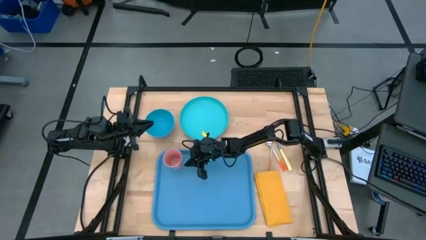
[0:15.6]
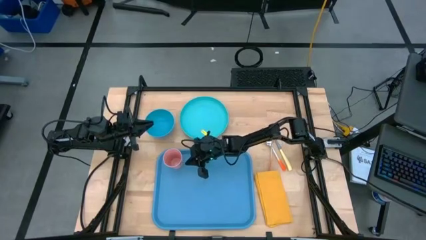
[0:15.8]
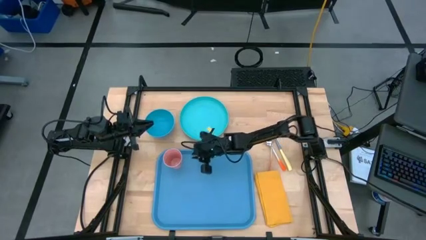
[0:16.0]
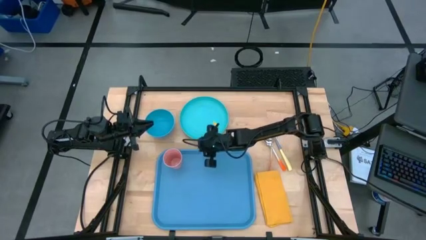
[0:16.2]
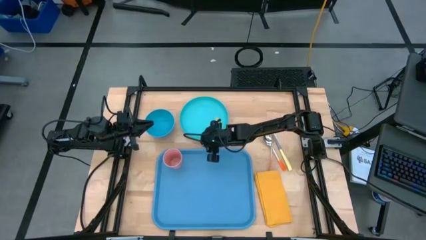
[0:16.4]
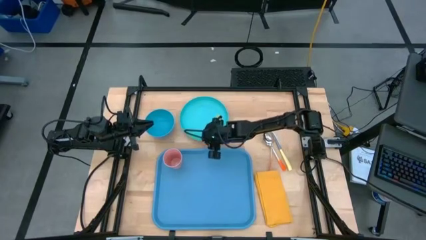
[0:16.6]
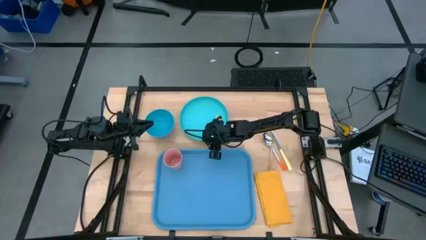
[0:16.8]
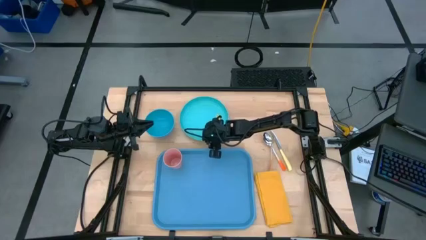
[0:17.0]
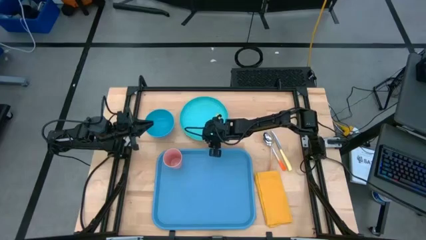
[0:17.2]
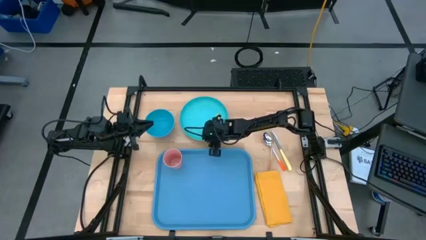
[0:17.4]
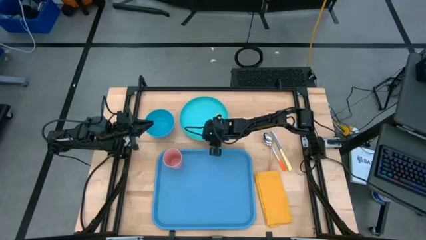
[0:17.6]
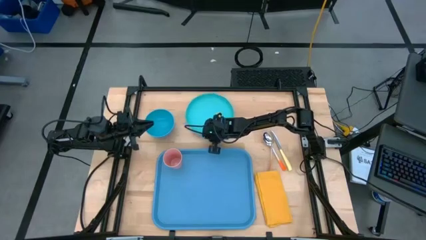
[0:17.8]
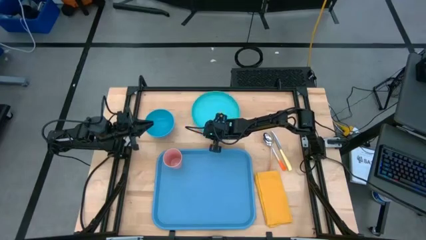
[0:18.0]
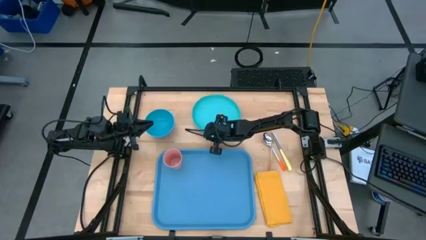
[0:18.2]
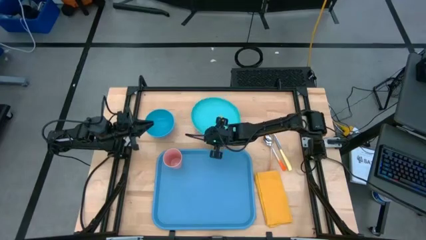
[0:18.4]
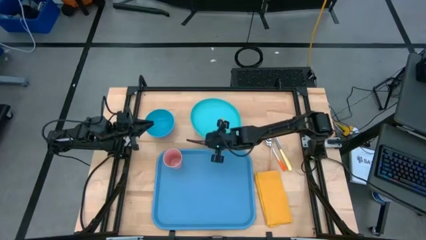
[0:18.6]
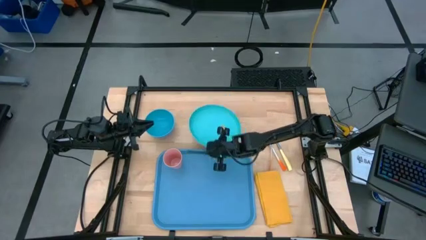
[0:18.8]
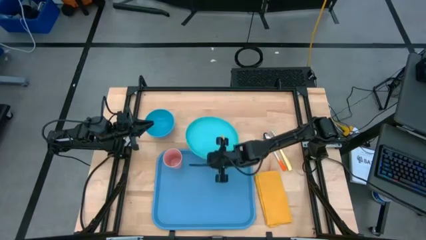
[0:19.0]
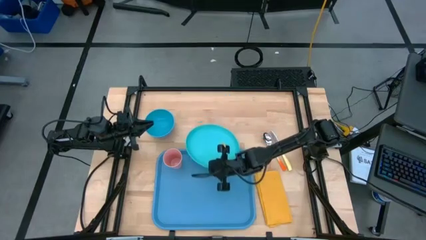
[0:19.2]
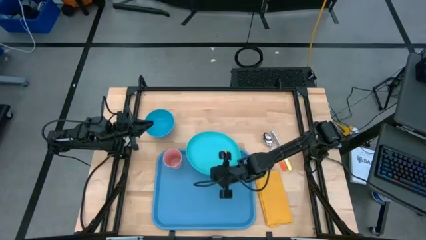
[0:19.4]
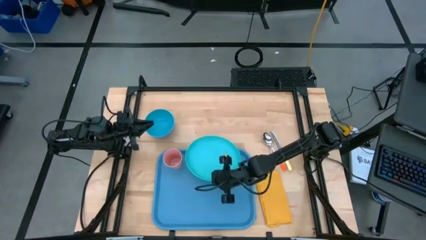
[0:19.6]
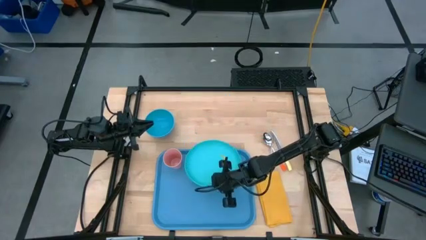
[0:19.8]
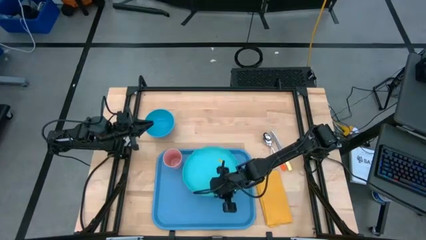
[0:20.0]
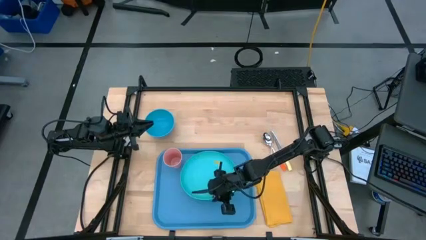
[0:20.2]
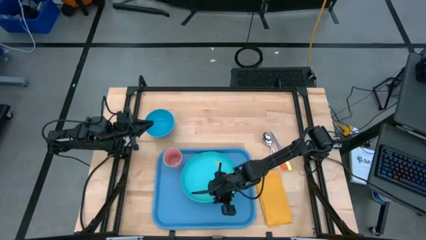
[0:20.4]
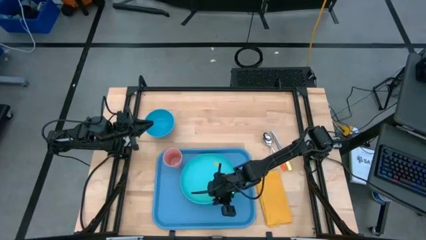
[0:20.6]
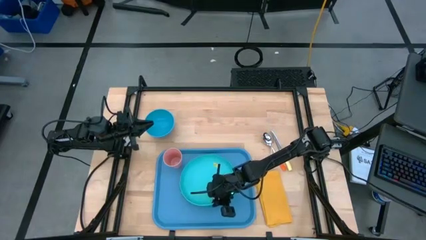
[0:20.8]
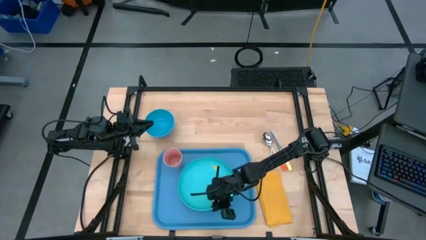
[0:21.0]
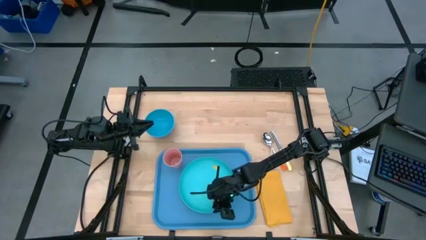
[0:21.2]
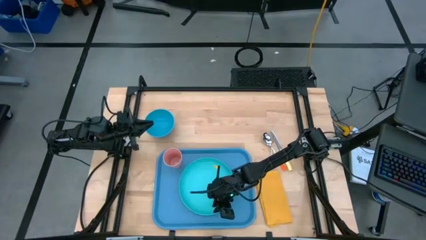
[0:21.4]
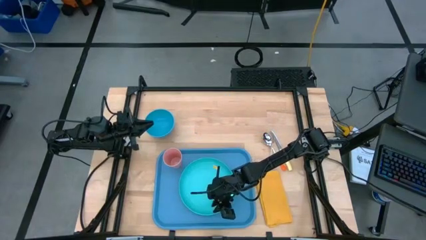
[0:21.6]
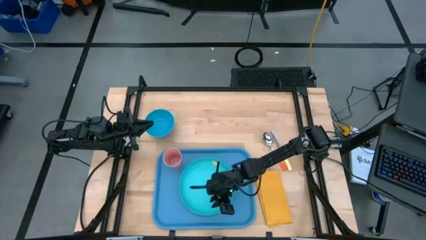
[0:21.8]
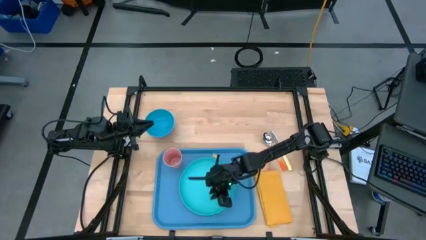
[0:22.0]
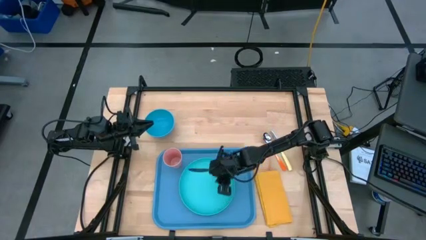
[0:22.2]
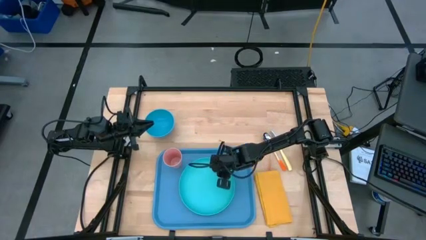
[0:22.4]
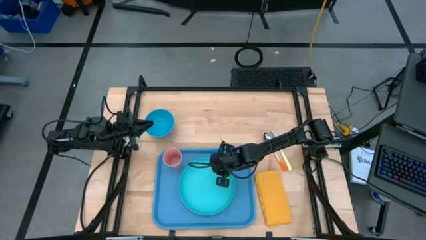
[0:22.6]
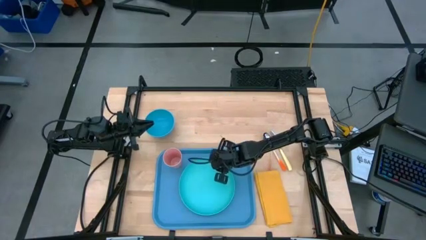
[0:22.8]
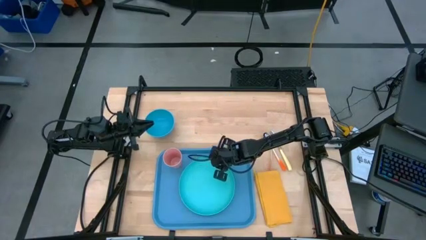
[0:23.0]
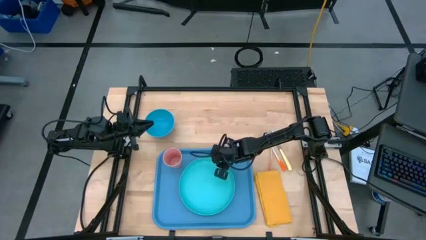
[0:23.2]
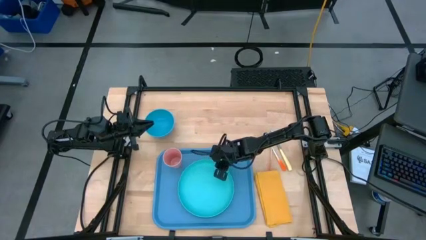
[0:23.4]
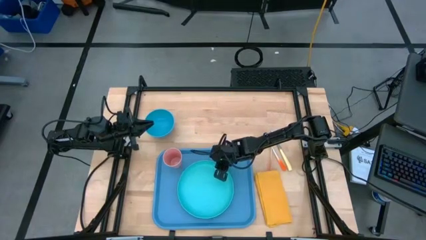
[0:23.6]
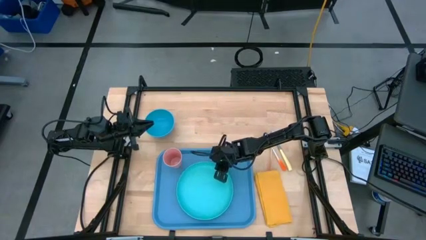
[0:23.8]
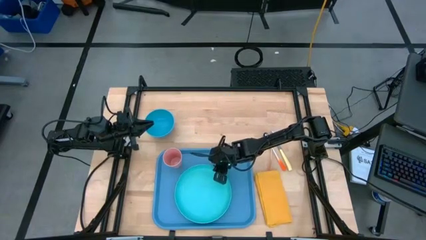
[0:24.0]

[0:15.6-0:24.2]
Task: Set up tray
Put the plate on the serving tray

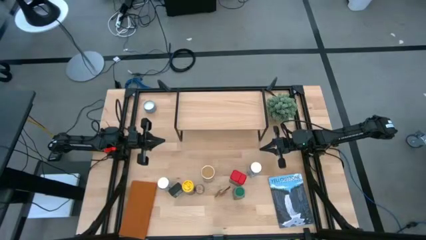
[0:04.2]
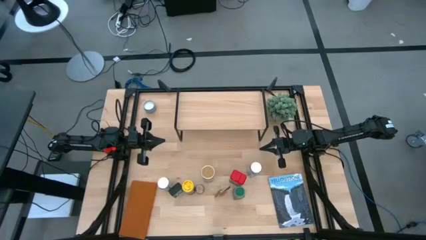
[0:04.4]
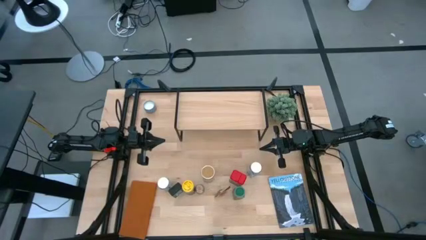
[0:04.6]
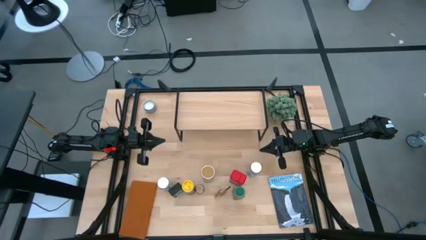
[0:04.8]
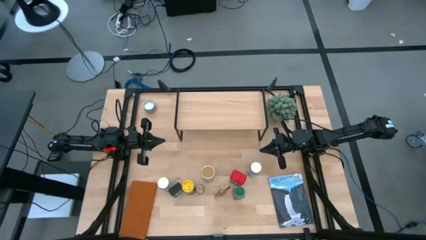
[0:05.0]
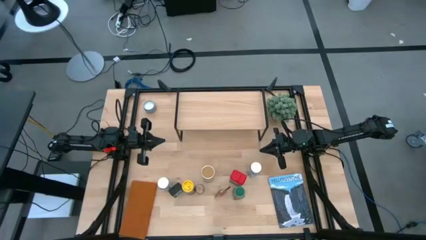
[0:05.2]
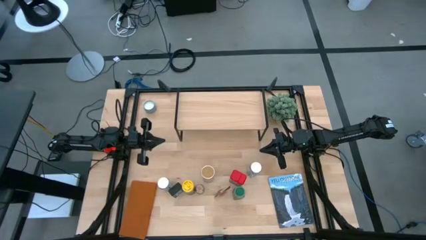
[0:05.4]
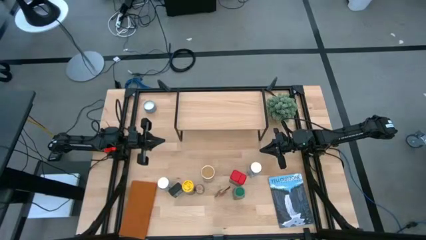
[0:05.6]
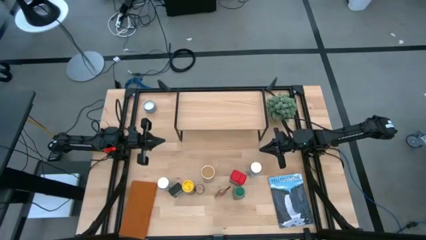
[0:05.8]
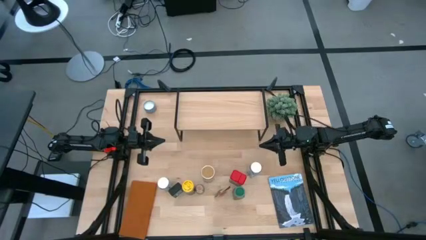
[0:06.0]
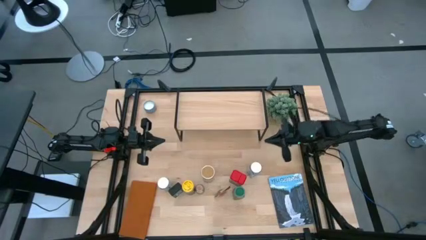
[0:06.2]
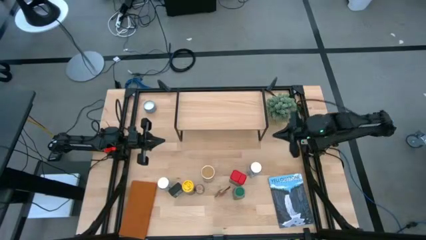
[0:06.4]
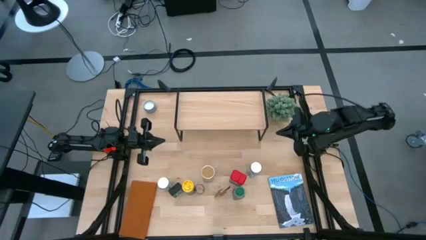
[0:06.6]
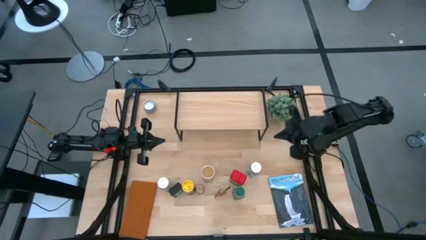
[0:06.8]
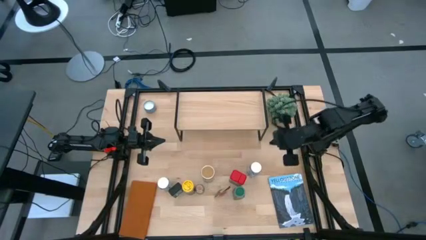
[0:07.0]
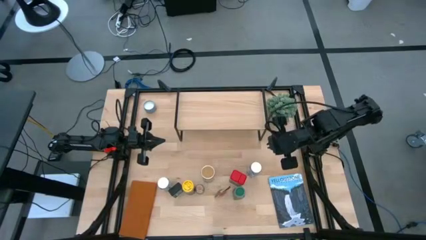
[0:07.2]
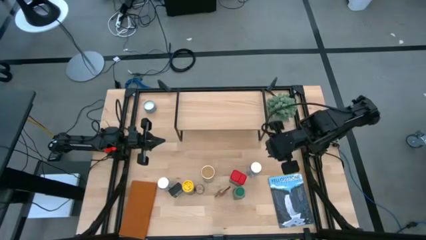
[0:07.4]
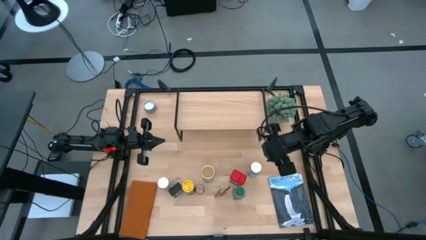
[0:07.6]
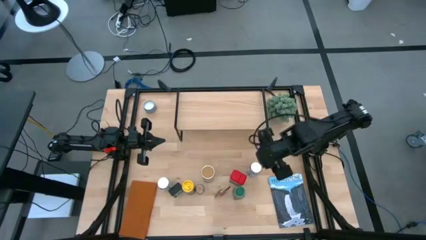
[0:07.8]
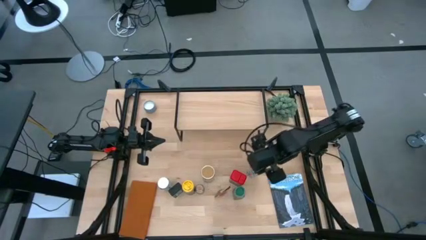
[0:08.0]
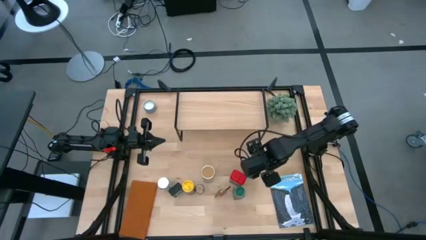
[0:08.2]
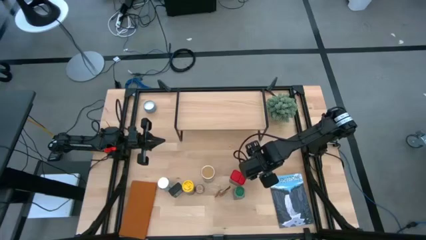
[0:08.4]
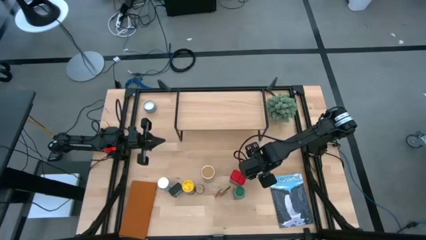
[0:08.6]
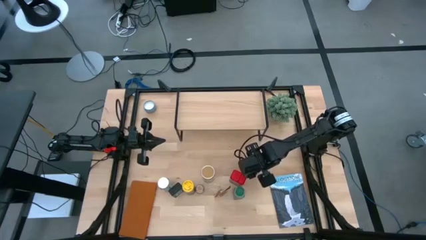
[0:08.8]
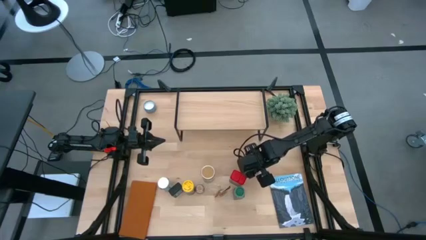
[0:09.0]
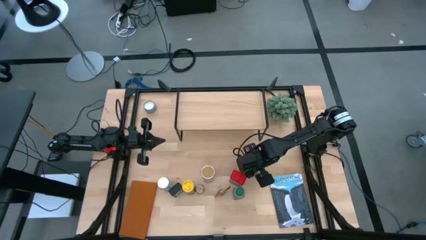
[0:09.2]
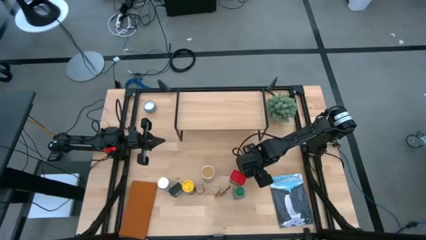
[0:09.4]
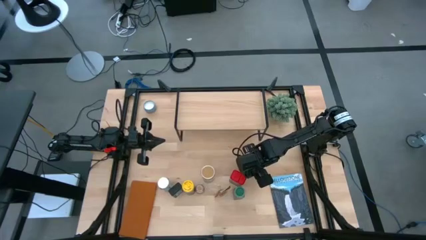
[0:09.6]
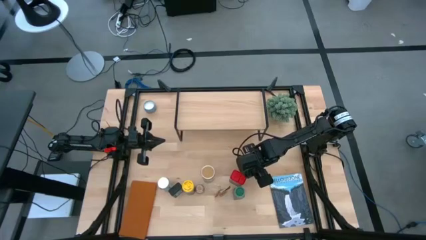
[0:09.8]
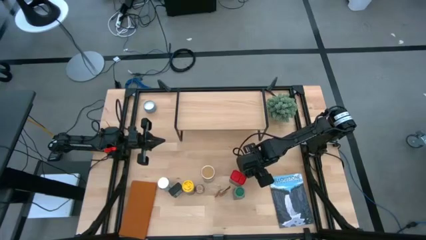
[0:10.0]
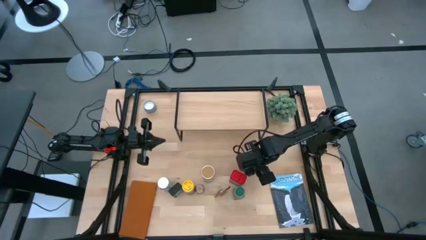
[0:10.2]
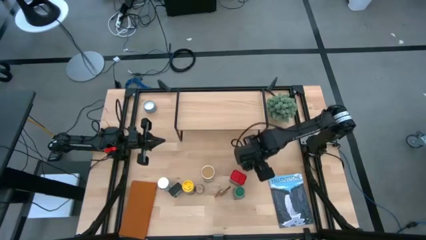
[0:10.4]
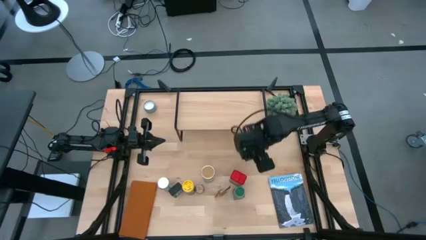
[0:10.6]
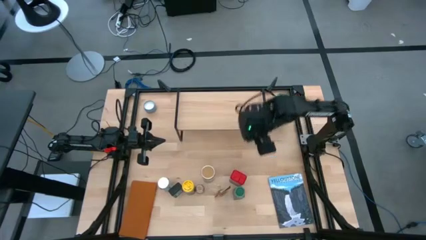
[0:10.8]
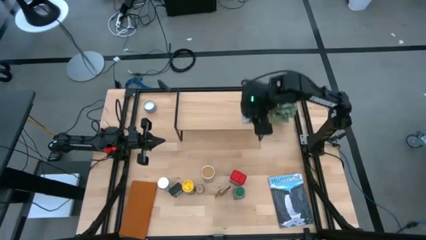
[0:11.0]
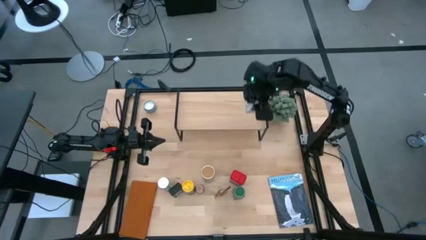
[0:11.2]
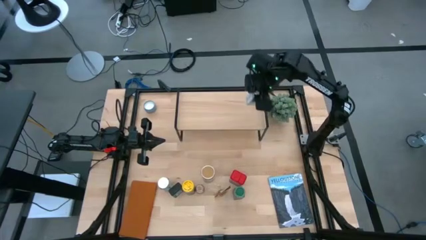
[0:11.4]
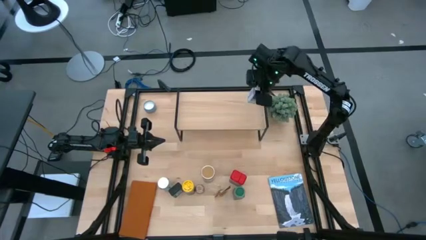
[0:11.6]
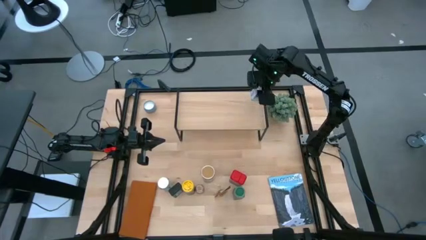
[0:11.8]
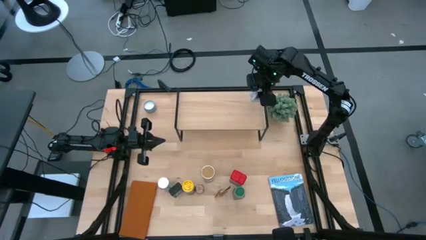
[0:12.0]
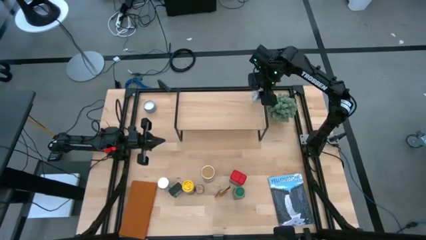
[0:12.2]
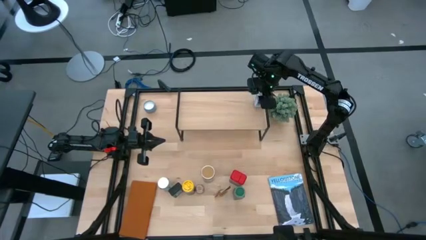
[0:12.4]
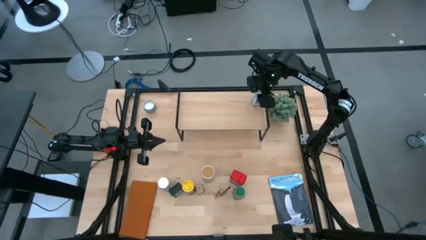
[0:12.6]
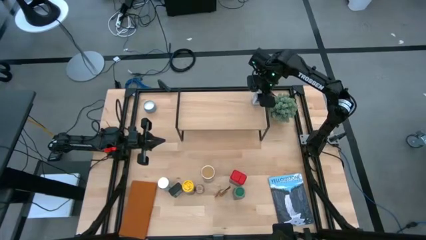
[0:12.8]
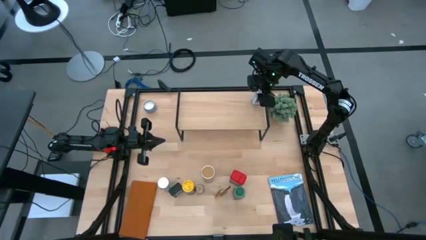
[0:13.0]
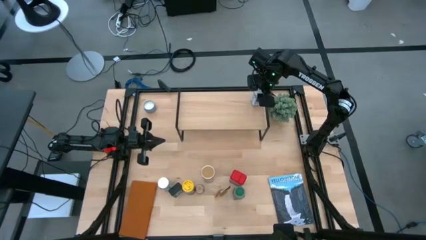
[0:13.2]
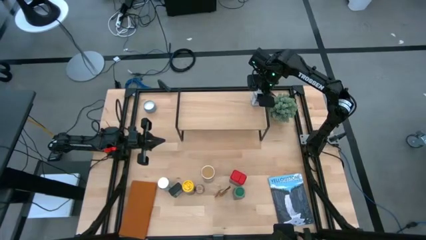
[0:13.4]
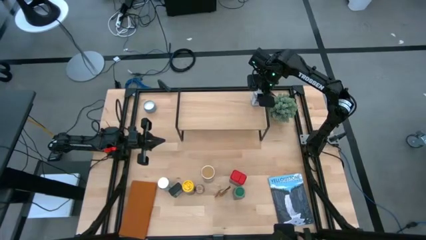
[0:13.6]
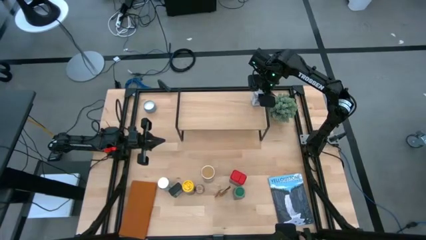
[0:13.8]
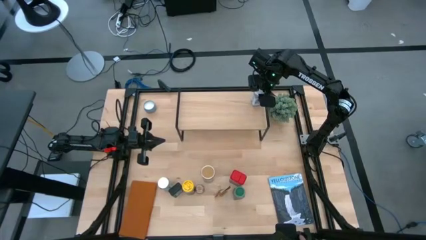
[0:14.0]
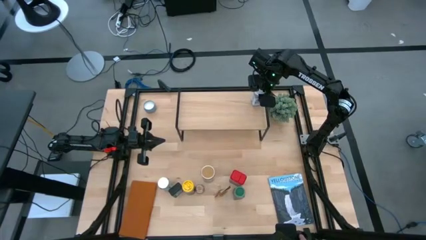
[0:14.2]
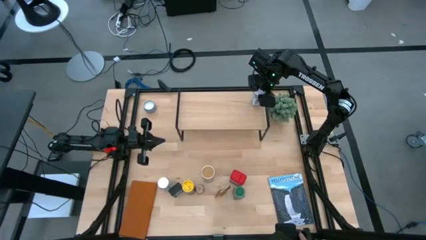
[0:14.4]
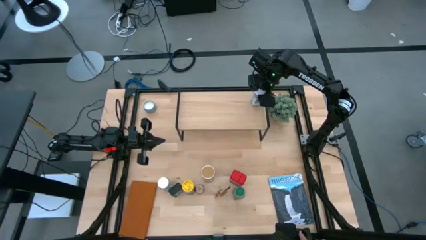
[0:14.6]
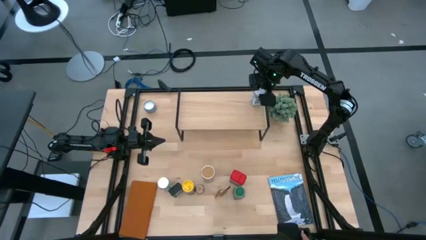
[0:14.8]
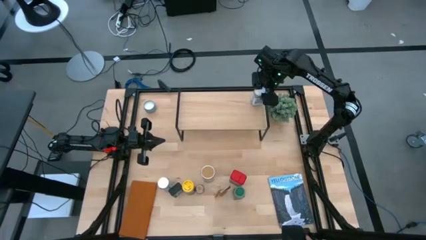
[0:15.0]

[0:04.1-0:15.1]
Task: Shelf spices
Put the right white seasoning bottle on the shelf
